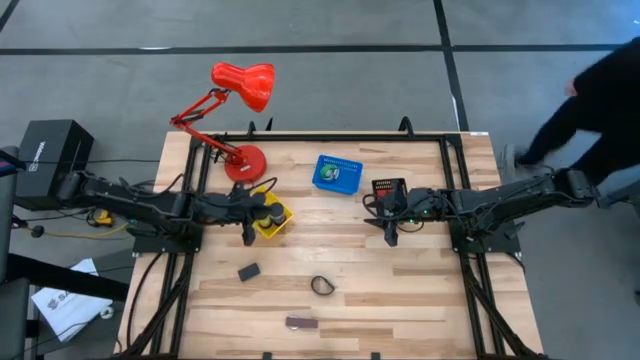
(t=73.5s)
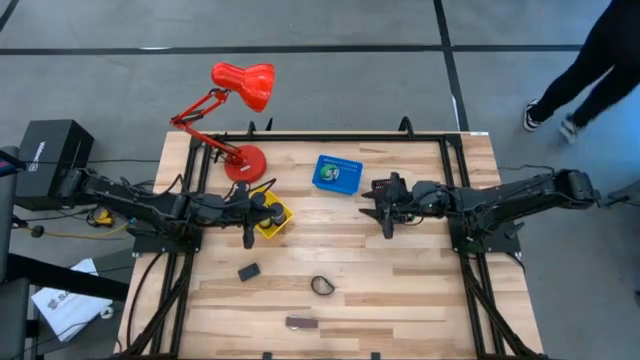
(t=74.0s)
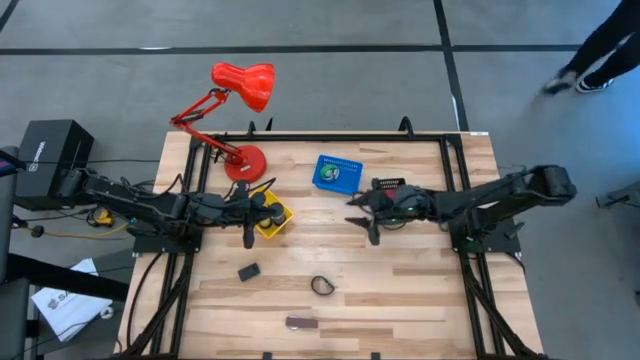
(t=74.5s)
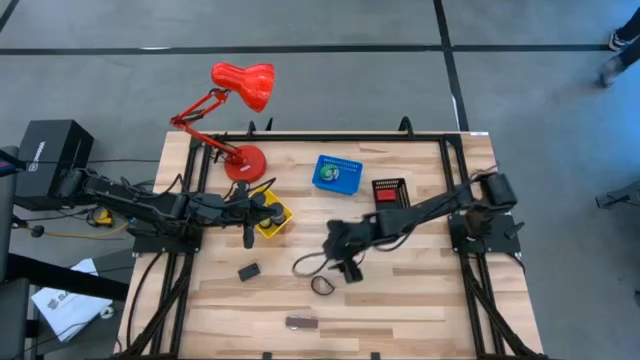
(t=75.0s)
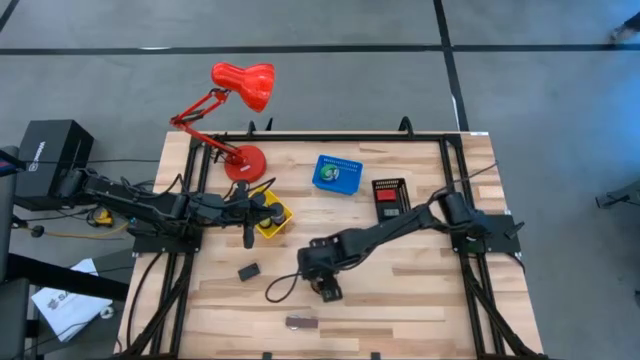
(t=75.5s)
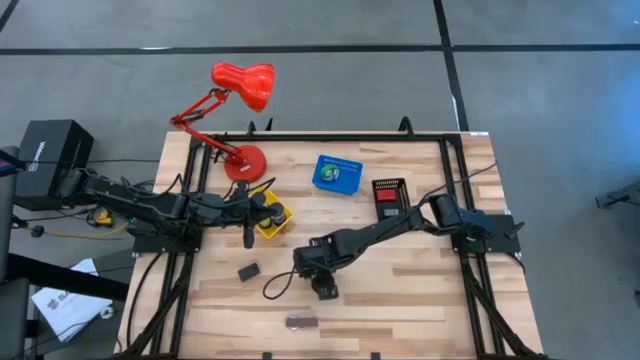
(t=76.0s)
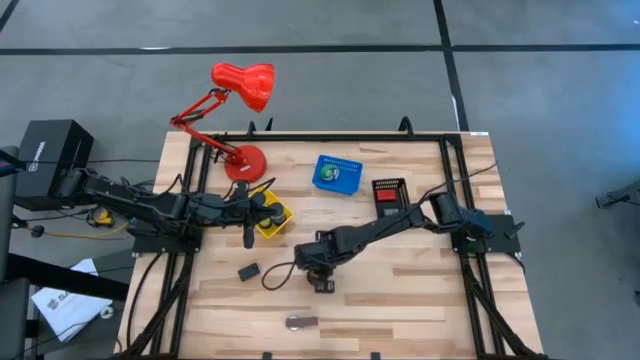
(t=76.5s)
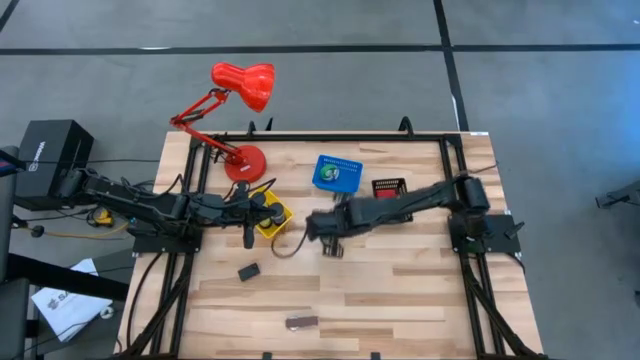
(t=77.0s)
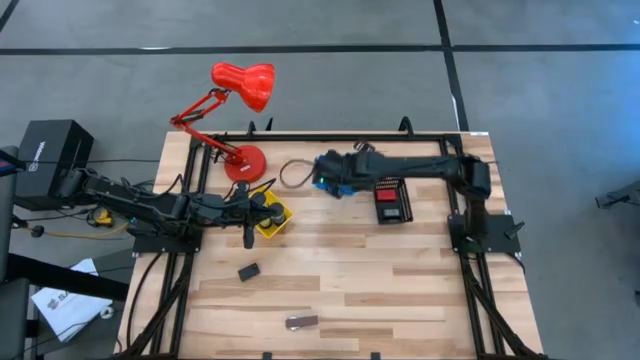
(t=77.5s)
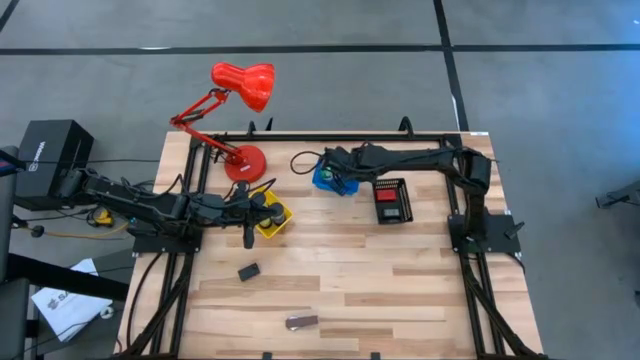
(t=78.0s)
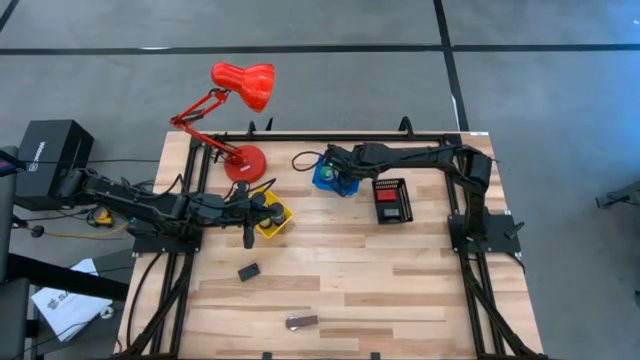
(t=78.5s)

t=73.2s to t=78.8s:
Task: Pick & Place Office items
Put the black wrist watch into the blue bin

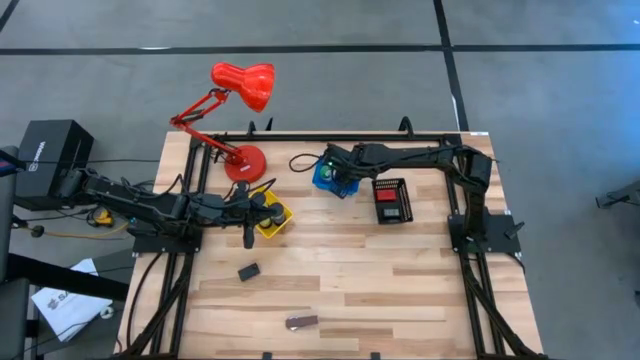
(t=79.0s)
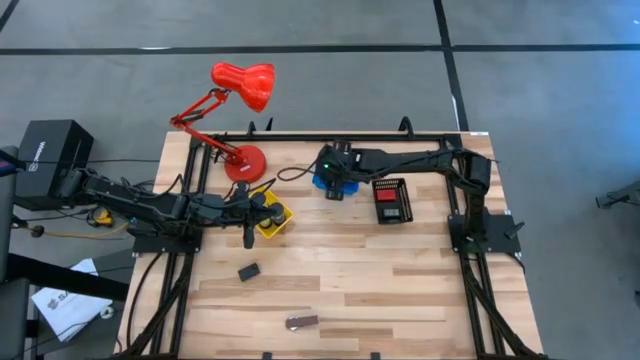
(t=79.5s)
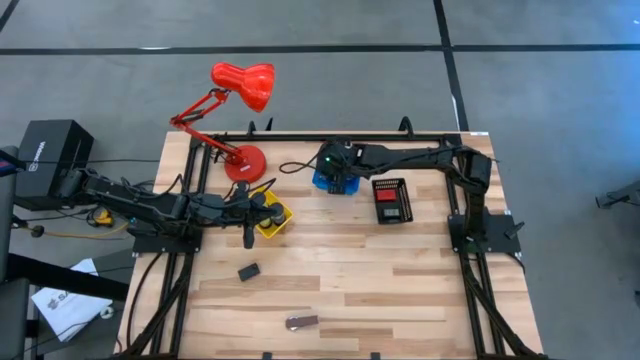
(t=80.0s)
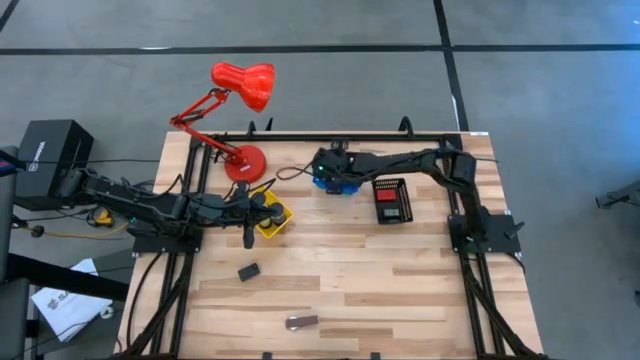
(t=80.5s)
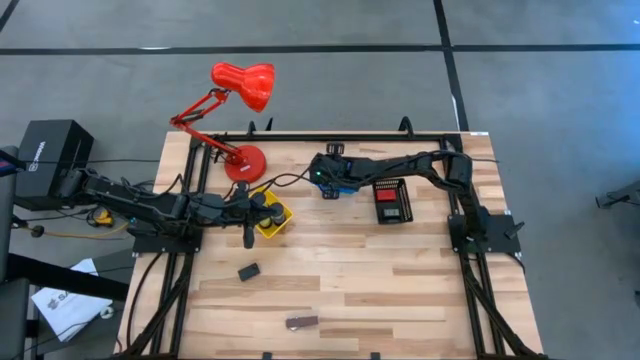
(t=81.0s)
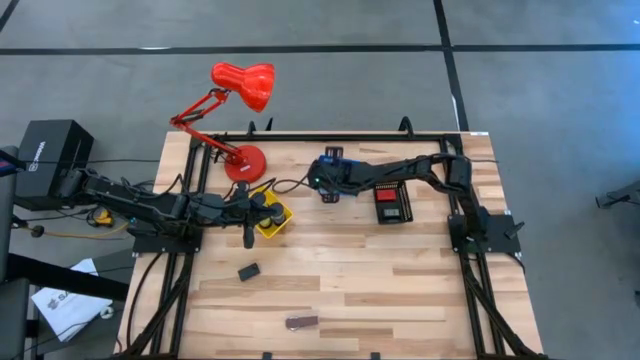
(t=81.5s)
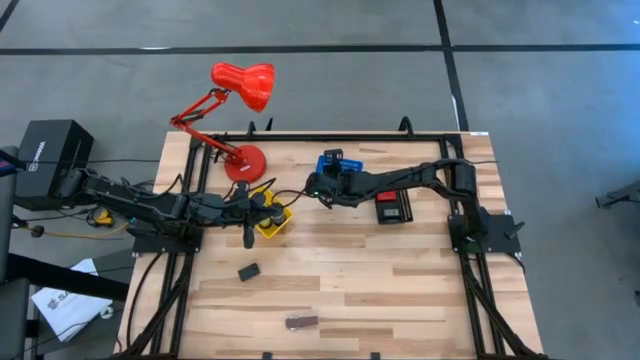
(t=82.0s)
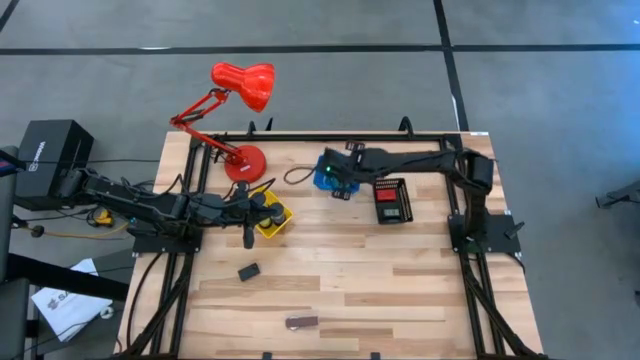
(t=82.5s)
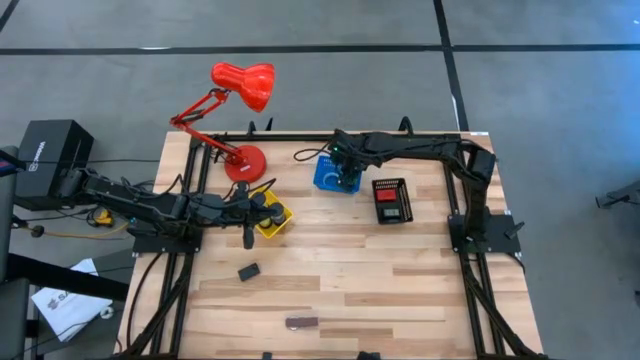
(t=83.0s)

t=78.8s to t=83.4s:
Adjust the green wrist watch in blue bin

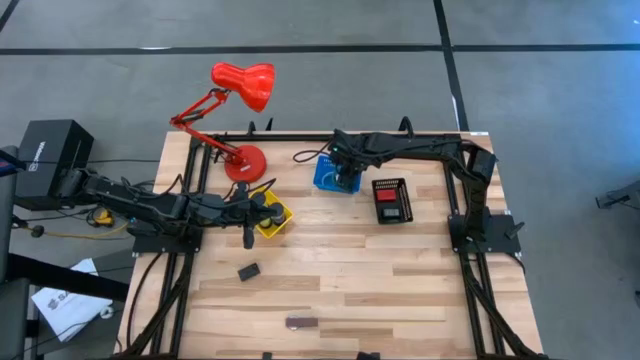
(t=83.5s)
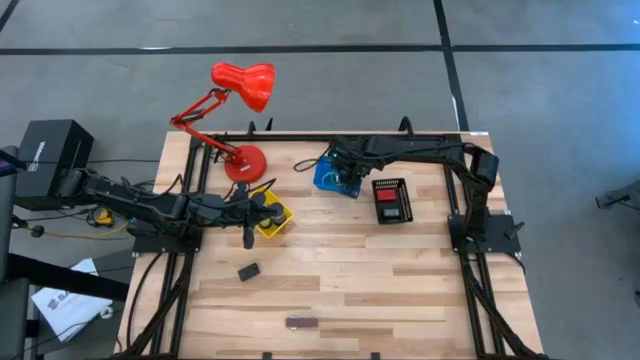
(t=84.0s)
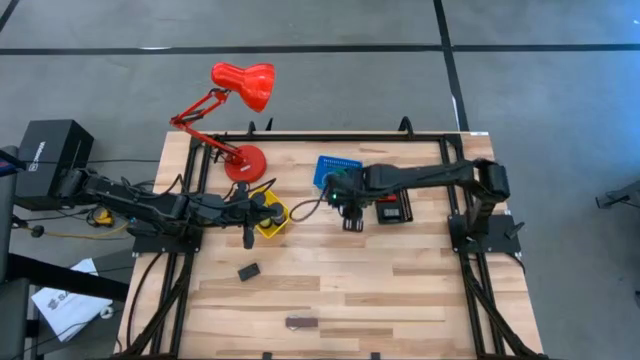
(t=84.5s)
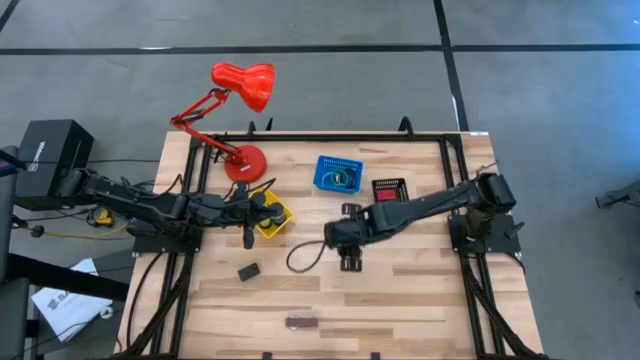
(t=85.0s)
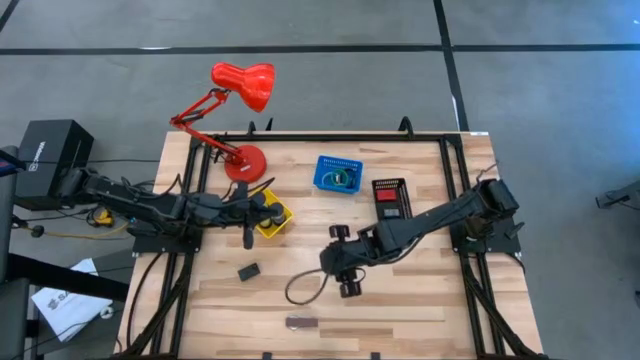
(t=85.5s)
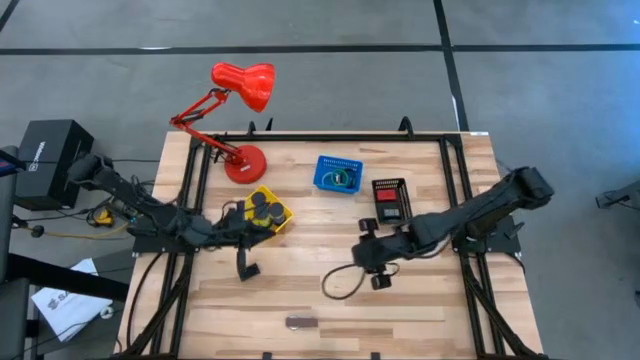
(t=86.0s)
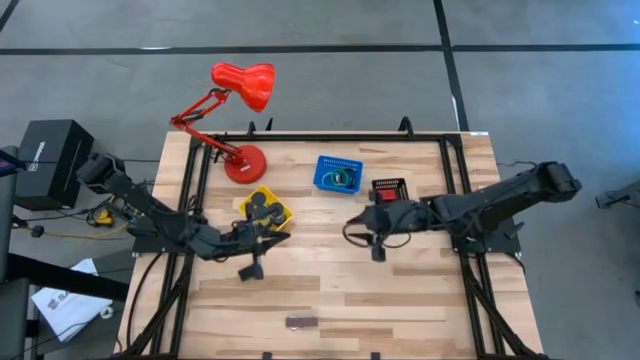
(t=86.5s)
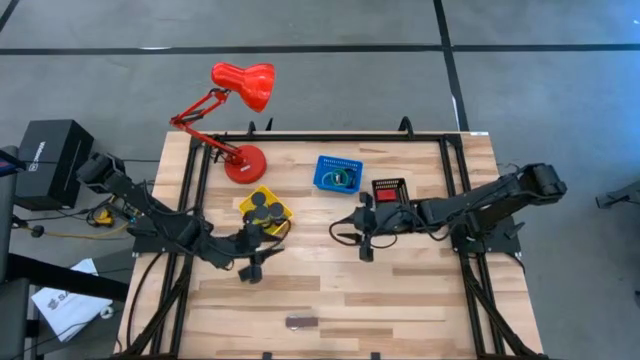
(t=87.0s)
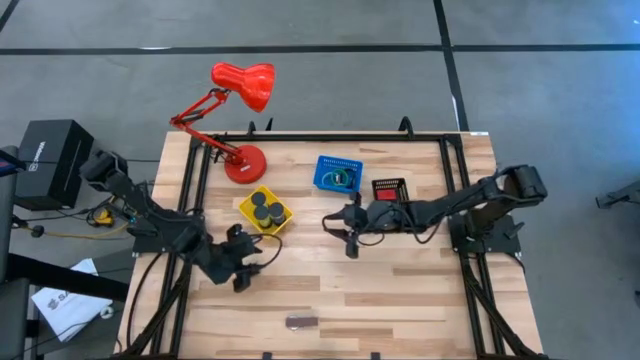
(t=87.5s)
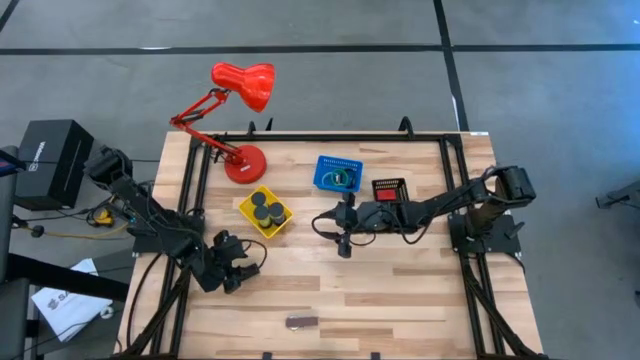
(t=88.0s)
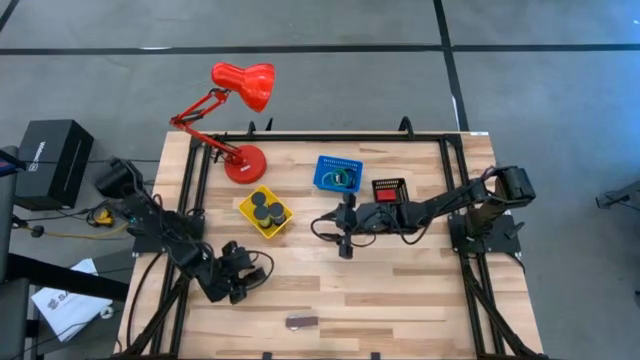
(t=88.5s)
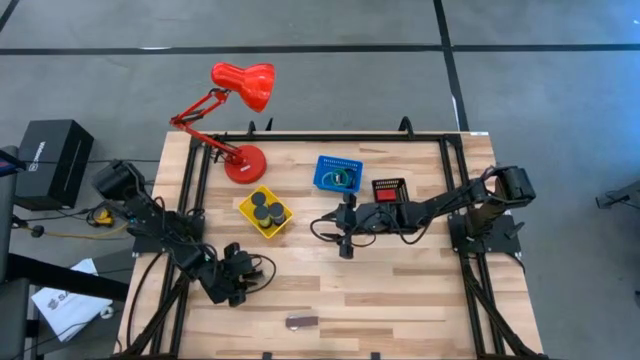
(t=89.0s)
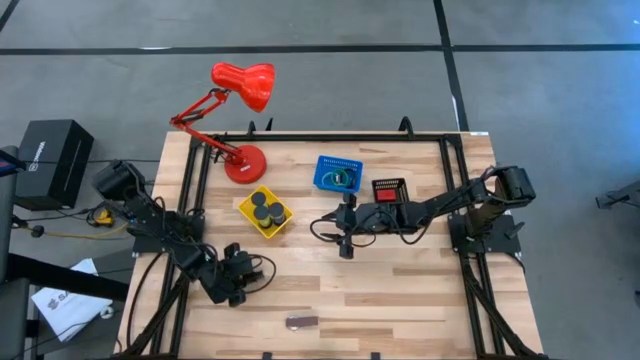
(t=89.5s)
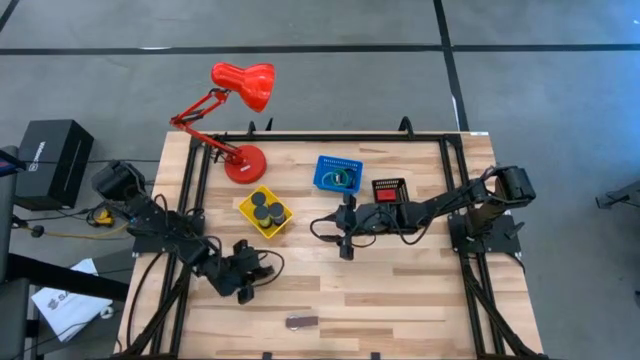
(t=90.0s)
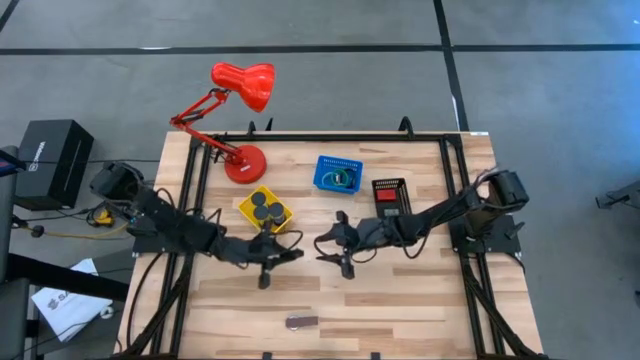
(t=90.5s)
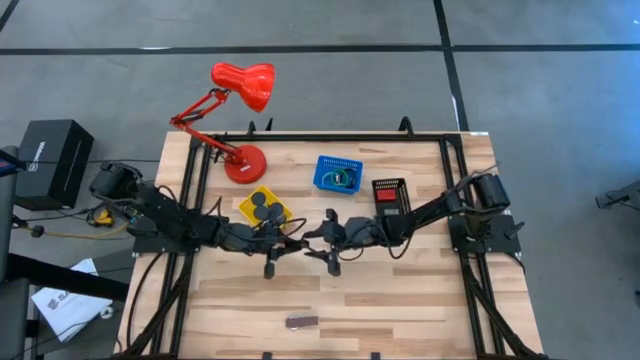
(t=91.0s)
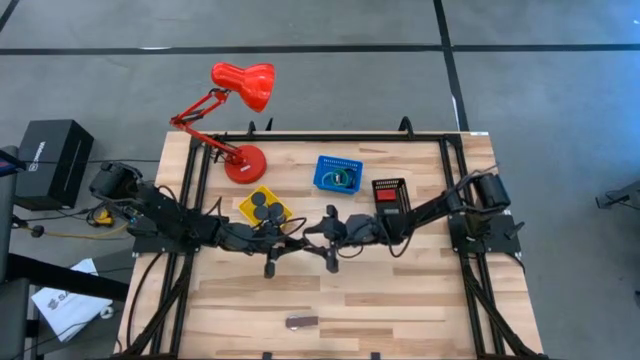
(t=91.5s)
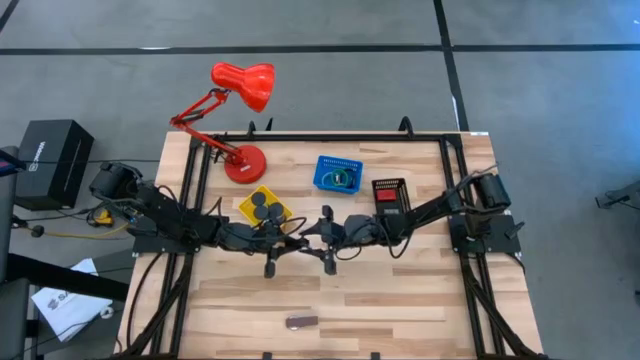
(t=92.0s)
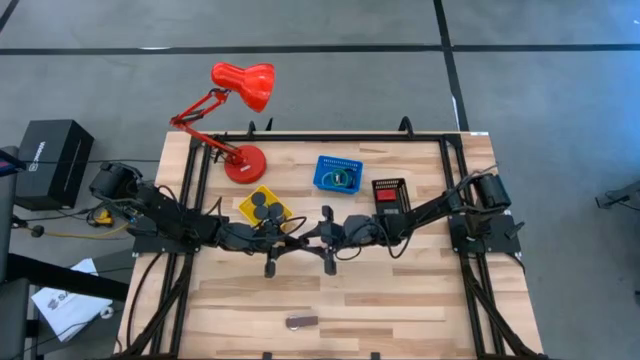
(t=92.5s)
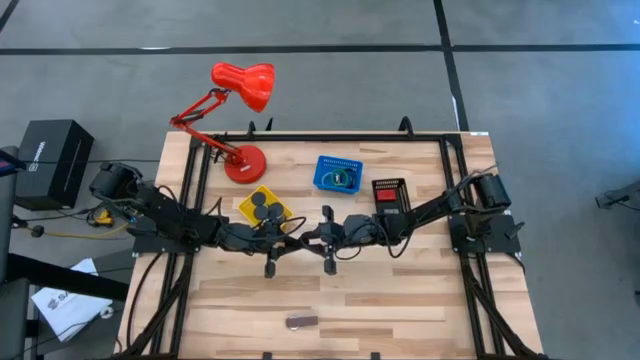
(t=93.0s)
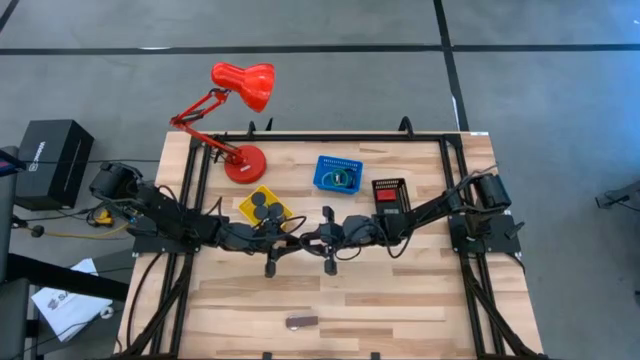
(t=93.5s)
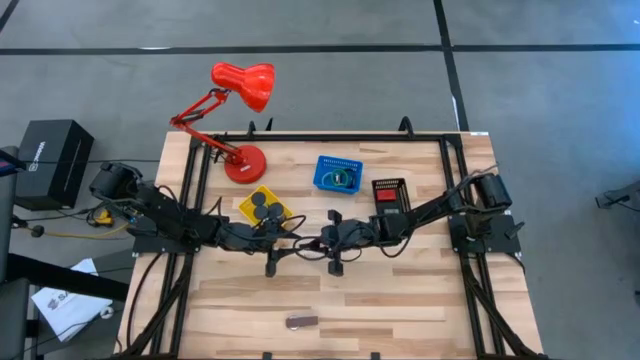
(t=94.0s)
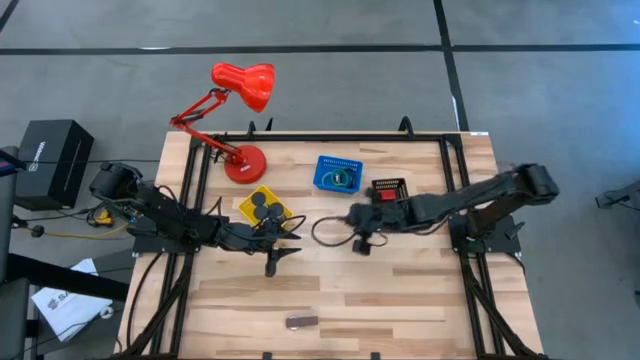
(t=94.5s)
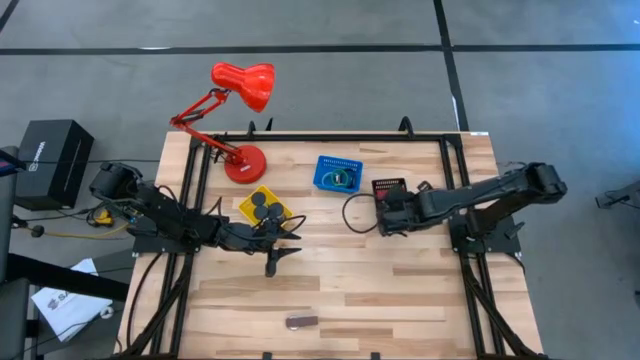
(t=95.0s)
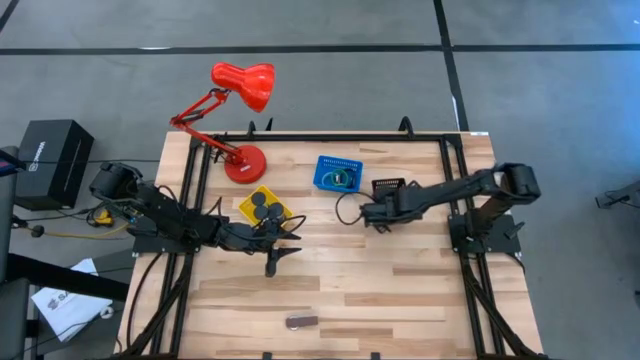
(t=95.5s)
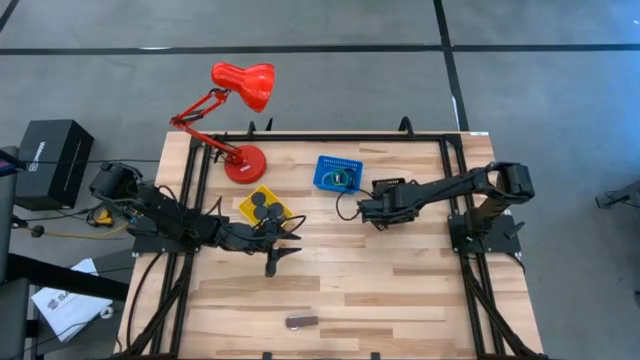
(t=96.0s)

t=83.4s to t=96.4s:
Put the black digital clock into the black bin
